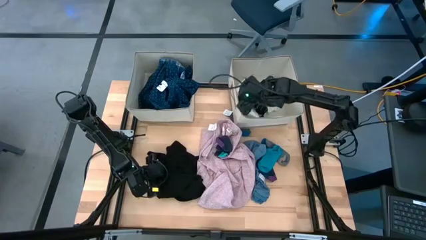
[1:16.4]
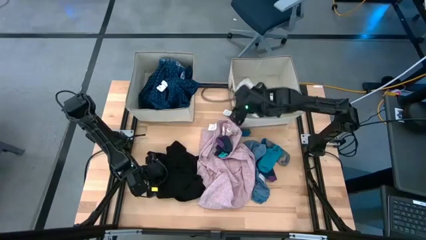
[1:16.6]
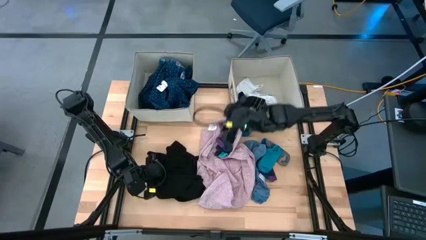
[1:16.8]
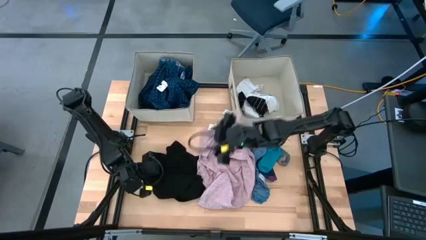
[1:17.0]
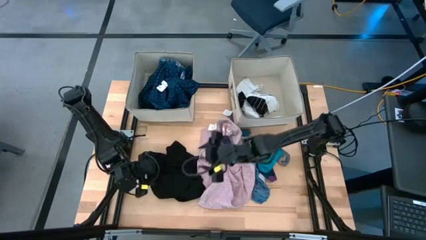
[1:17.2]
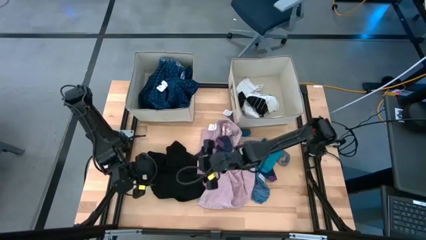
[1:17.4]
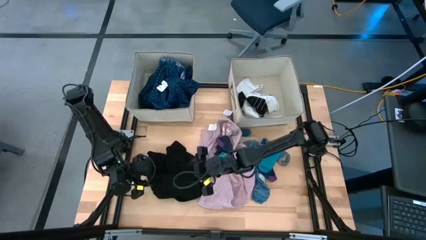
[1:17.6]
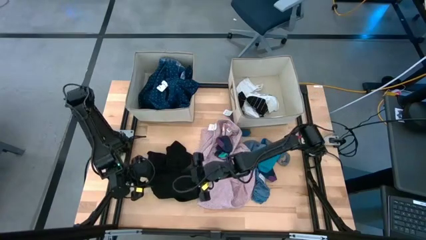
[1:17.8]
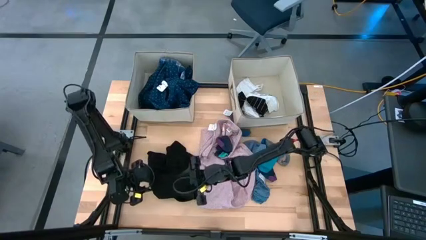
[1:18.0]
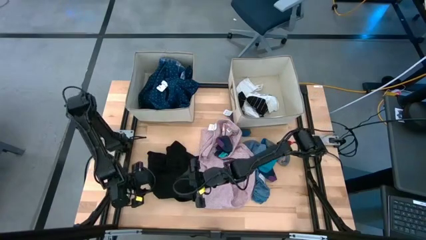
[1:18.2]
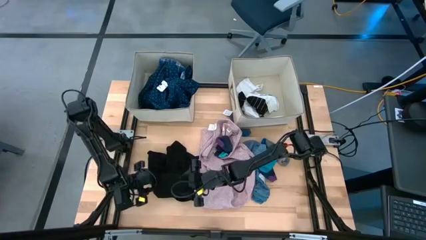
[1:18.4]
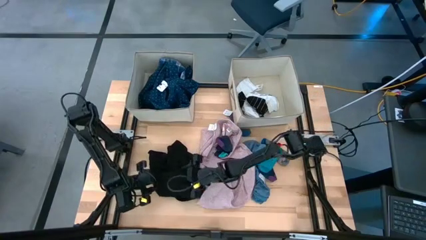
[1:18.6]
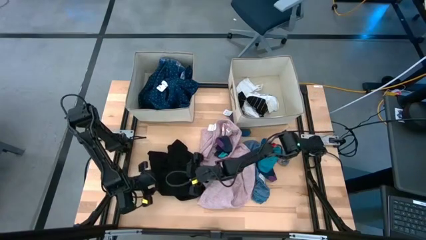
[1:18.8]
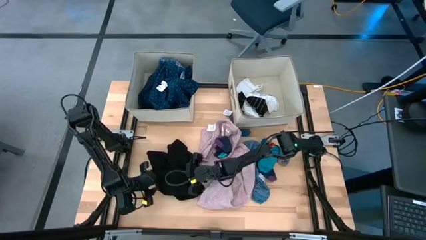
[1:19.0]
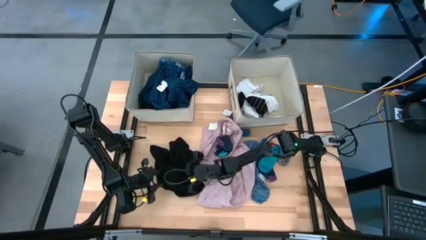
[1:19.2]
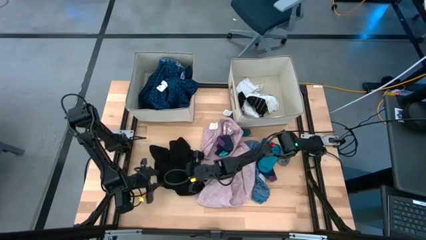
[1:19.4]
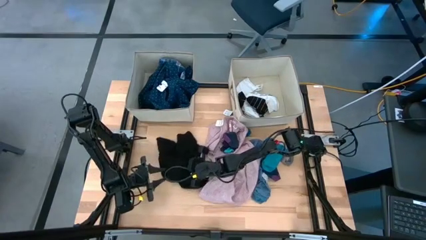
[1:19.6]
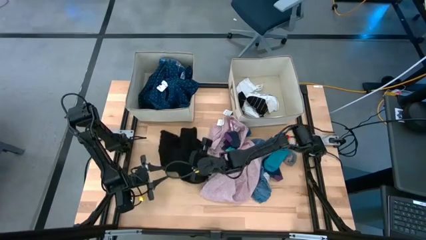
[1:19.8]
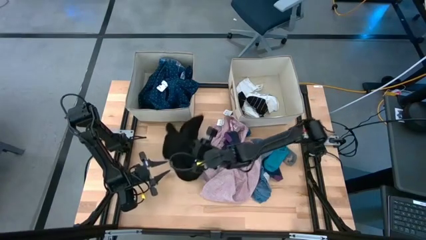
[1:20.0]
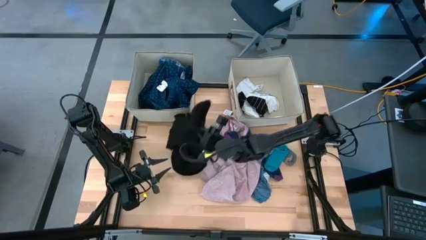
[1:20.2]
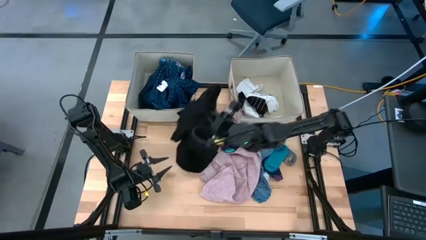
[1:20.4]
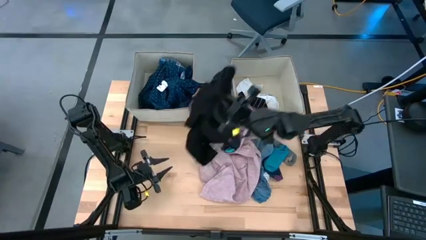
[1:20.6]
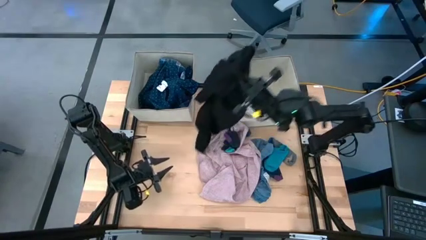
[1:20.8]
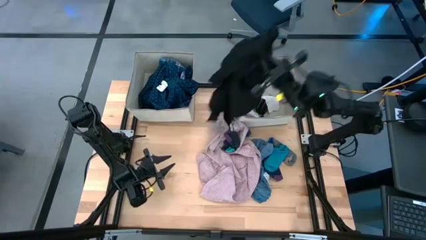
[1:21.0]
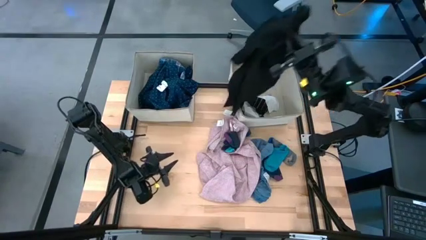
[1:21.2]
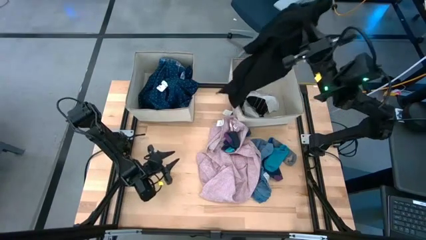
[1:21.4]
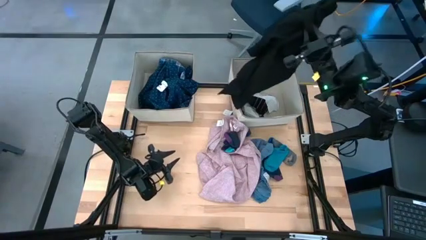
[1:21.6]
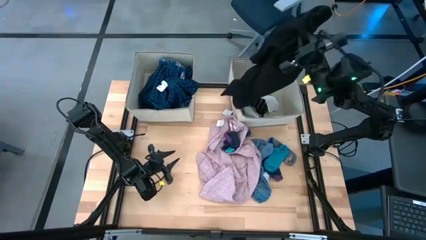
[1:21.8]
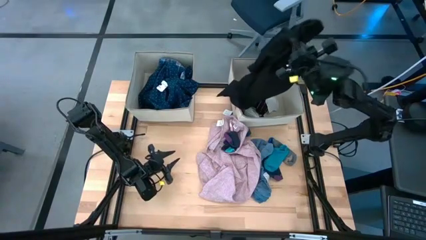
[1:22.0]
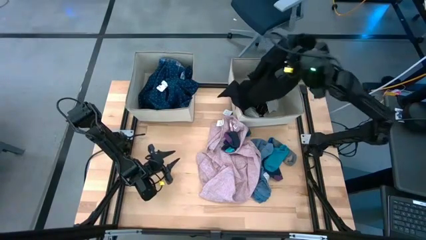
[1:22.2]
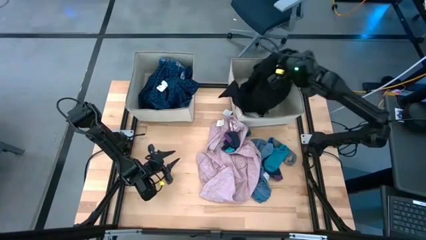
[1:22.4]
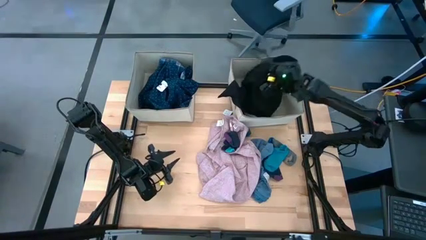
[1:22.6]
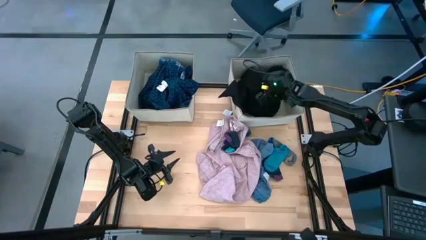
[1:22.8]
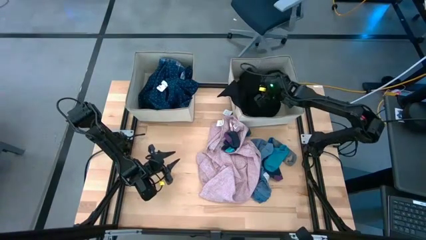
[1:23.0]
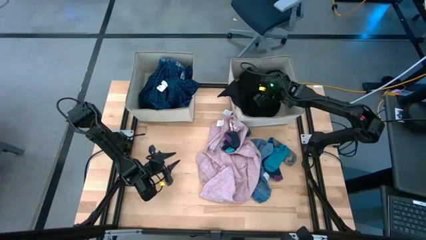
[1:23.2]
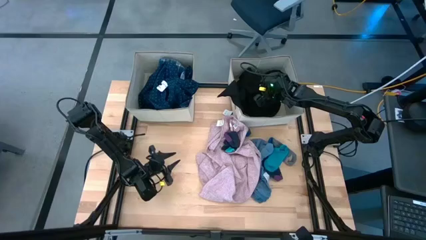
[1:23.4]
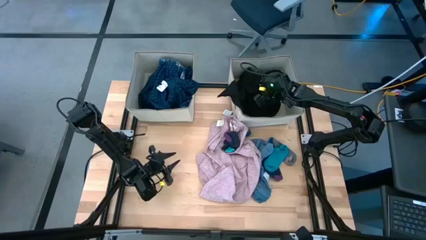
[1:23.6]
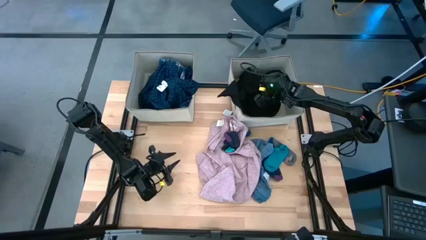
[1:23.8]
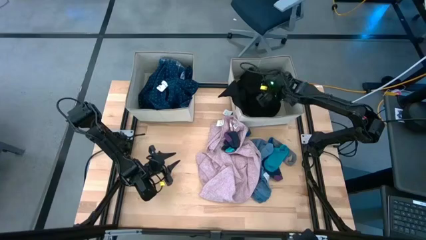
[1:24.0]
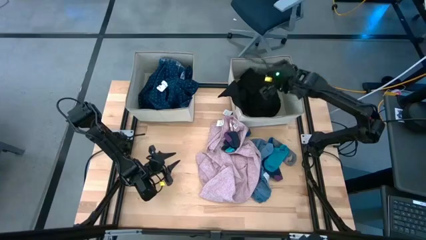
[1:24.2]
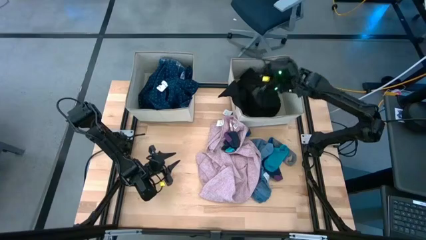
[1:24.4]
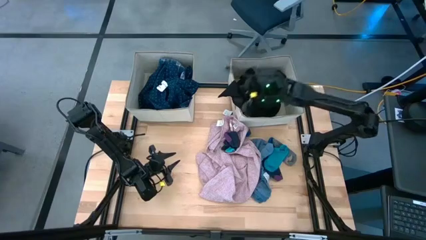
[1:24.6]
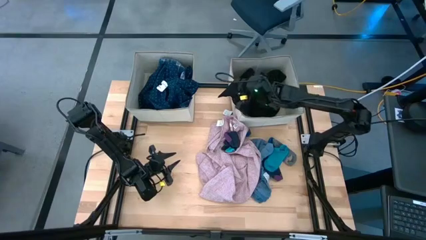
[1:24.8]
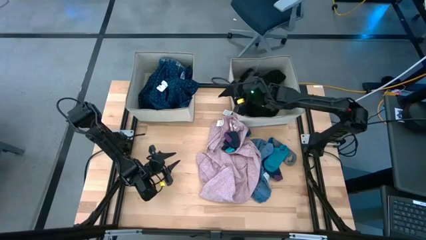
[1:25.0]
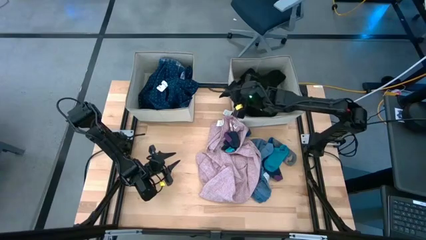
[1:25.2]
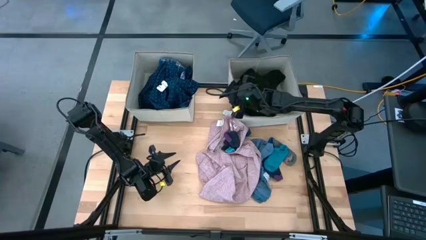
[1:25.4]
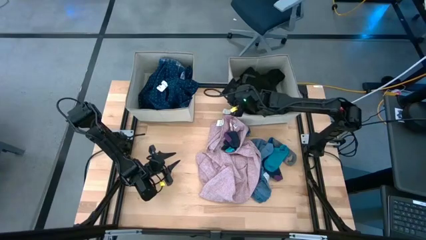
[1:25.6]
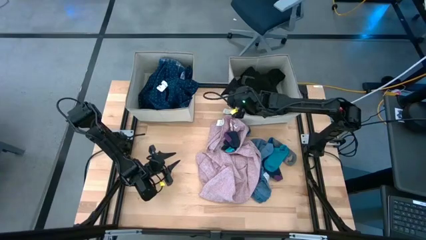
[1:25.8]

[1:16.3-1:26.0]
Task: Sort clothes
Put the black shirt into the right brown laundry organizer

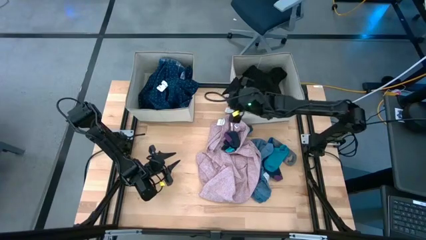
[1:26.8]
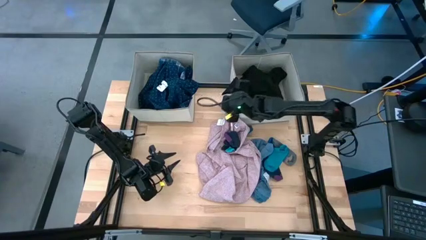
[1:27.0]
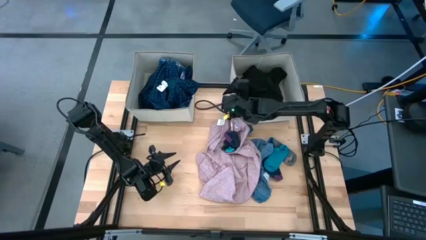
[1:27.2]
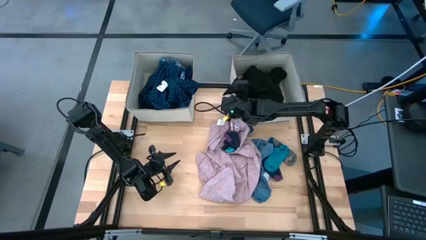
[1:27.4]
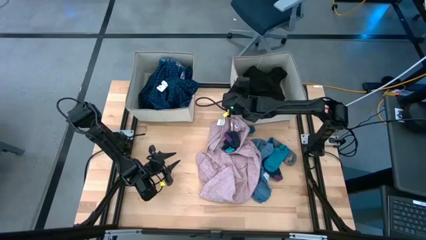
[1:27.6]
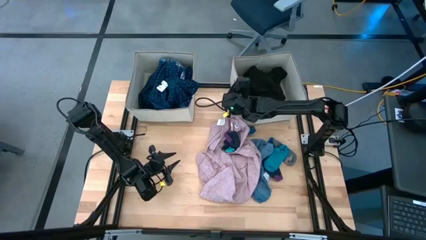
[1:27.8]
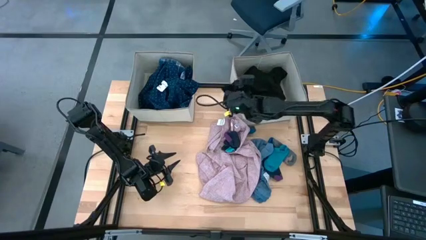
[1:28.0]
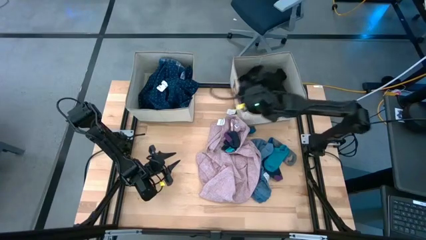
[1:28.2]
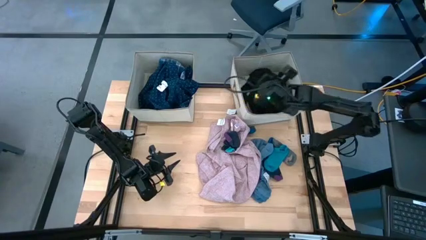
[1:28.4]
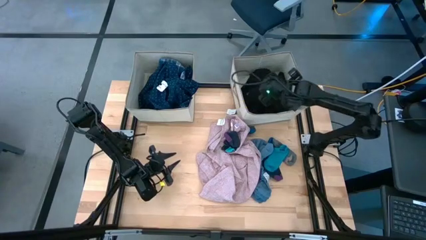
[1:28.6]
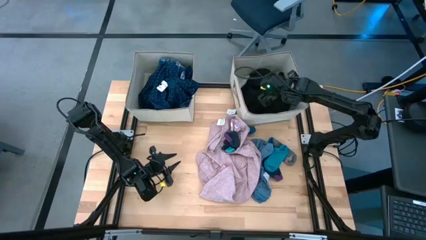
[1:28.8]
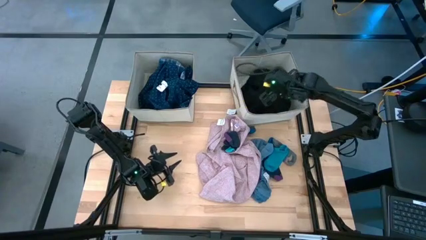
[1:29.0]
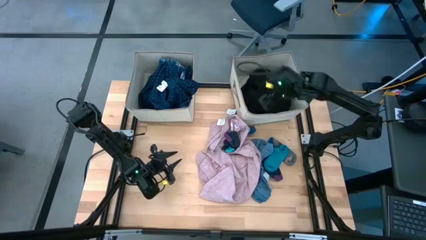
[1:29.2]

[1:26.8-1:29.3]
Put the black shirt into the right brown laundry organizer

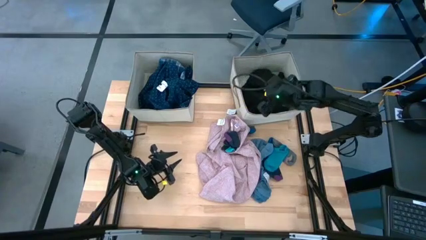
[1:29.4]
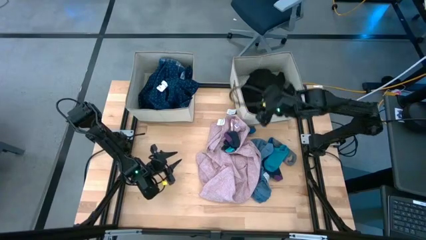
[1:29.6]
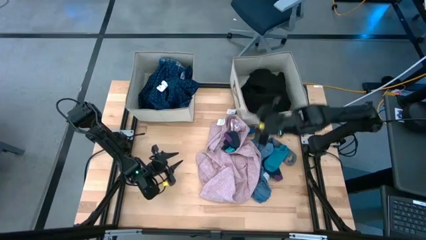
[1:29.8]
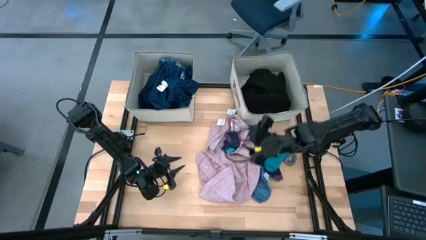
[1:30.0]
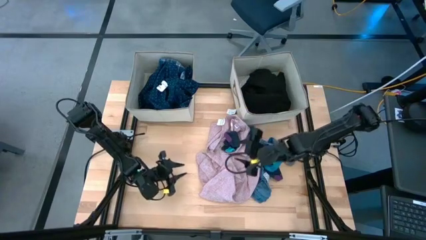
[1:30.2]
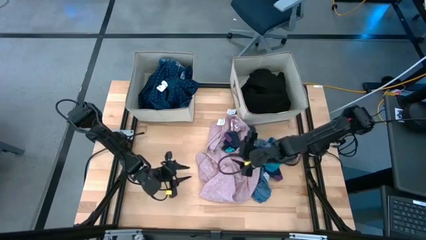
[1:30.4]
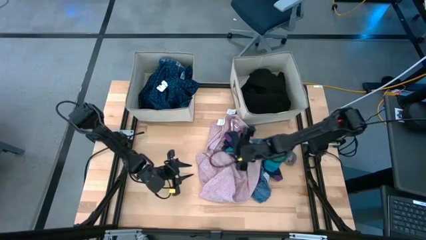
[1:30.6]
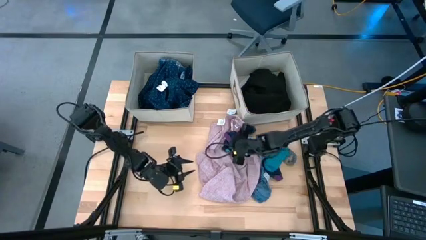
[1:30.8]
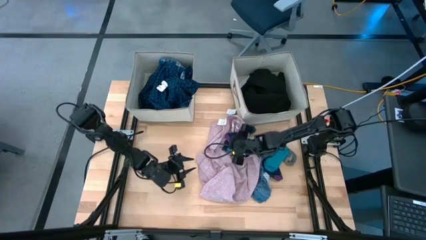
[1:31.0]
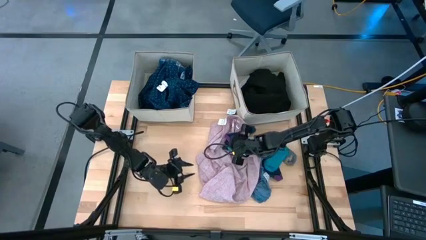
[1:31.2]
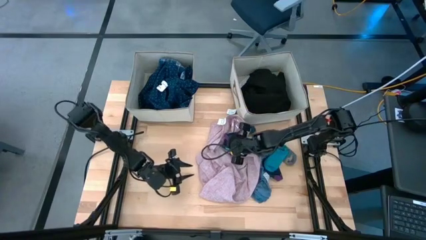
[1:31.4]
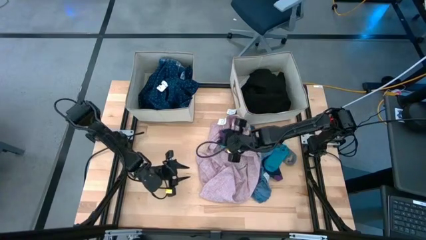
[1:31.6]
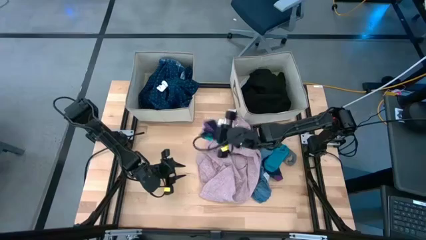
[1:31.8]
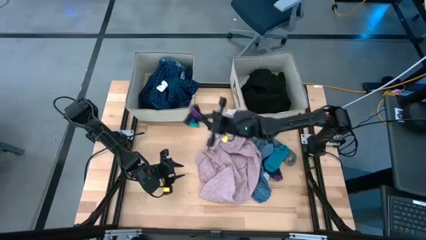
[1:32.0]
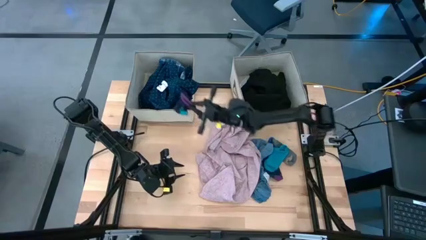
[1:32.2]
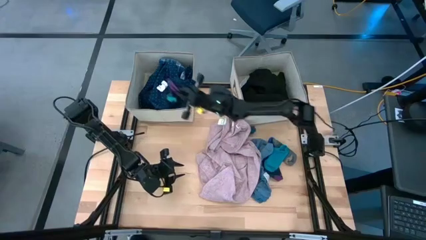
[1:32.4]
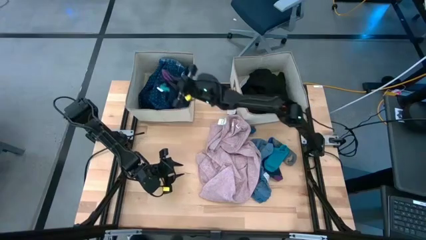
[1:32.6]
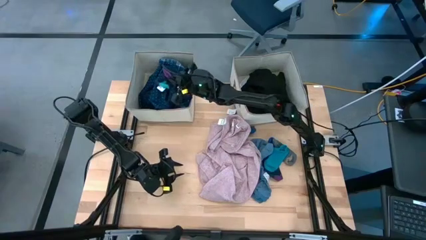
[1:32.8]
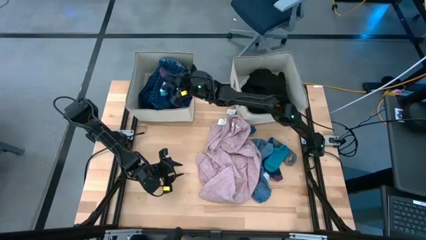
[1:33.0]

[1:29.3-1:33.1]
Put the dark blue sock into the left brown laundry organizer
